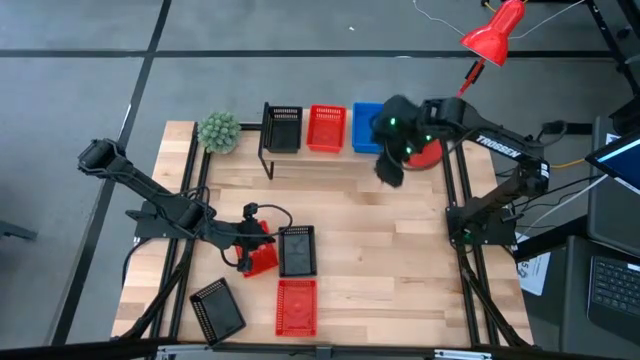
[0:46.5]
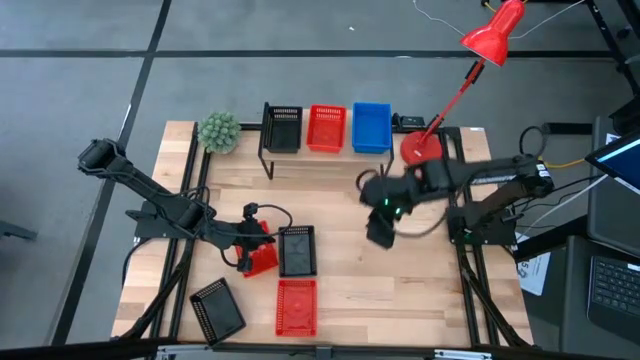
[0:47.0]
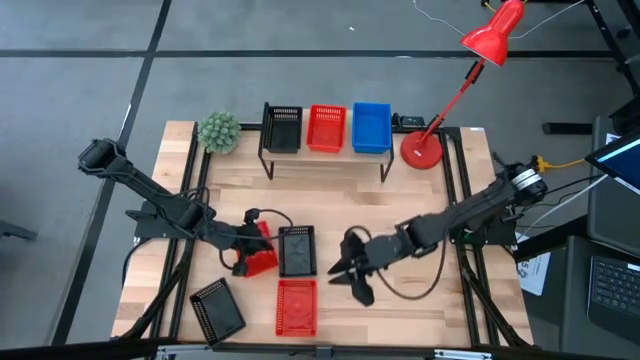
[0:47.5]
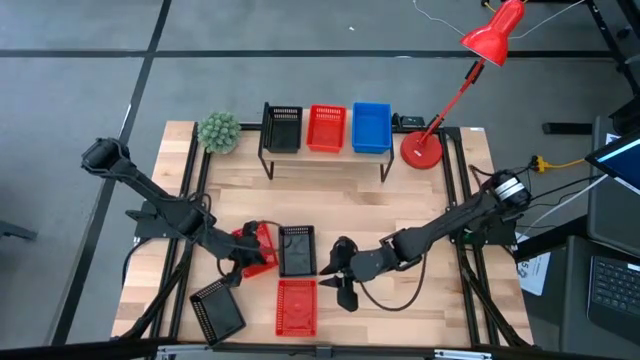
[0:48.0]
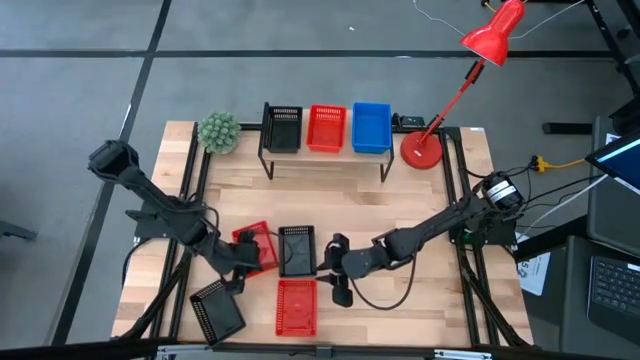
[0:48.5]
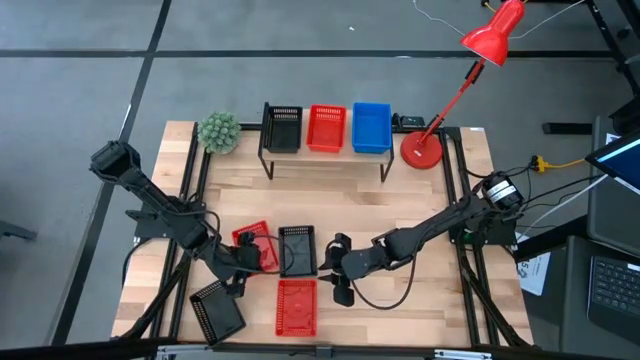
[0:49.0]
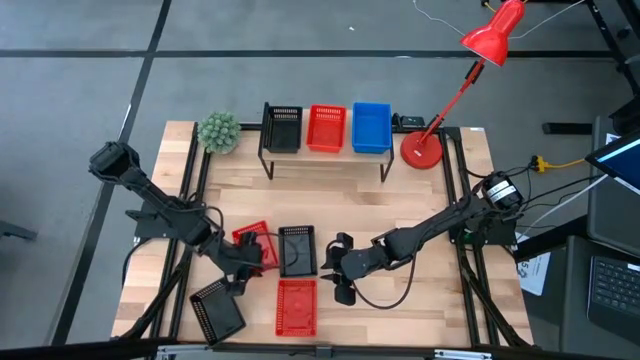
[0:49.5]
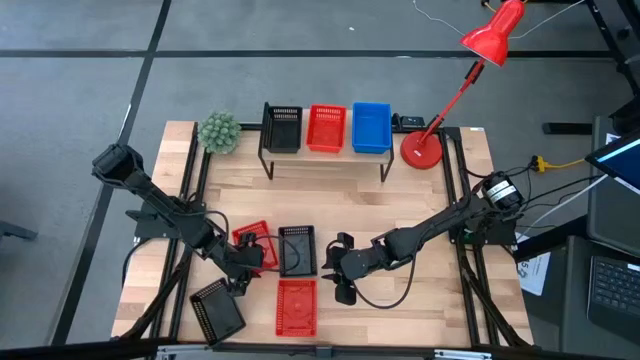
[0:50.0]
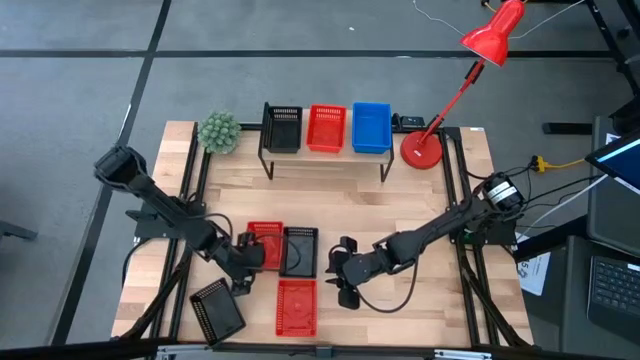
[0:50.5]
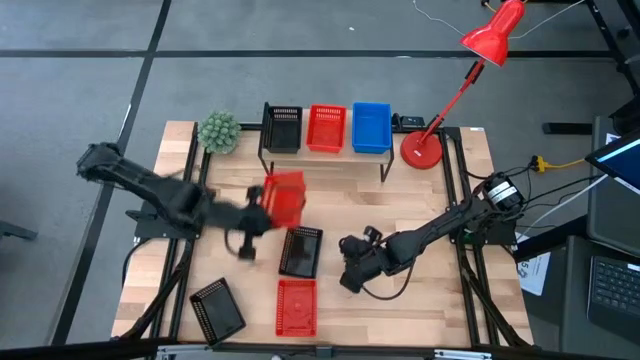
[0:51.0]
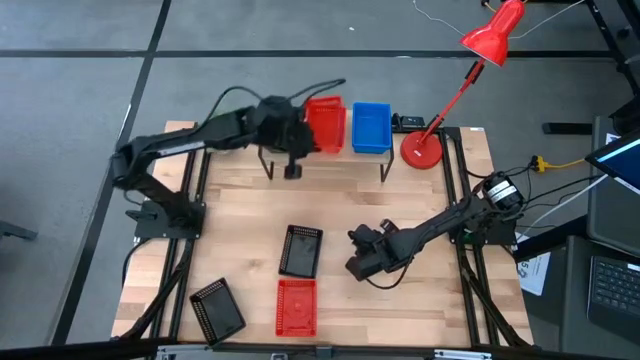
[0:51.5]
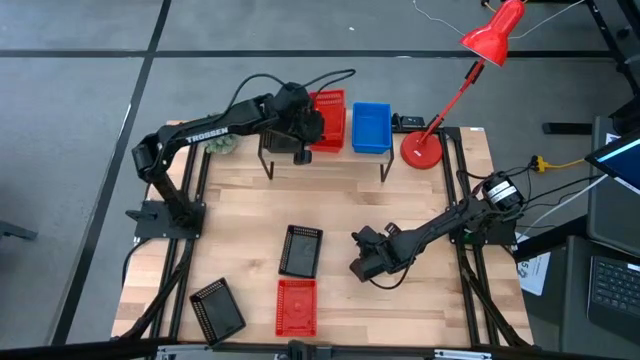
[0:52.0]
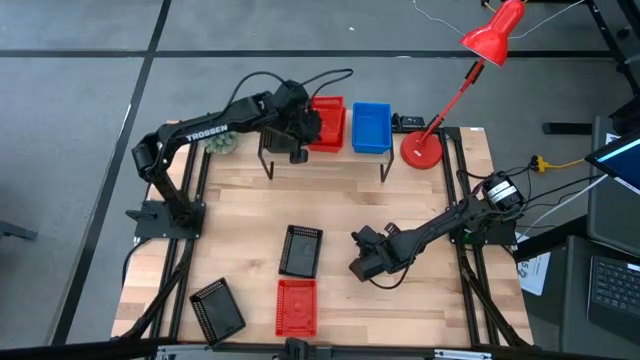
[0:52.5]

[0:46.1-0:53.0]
Task: Stack baskets on shelf by color
Stack the top red bin on the red bin on the shelf

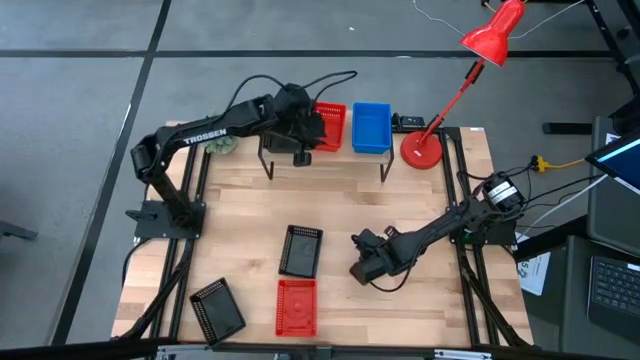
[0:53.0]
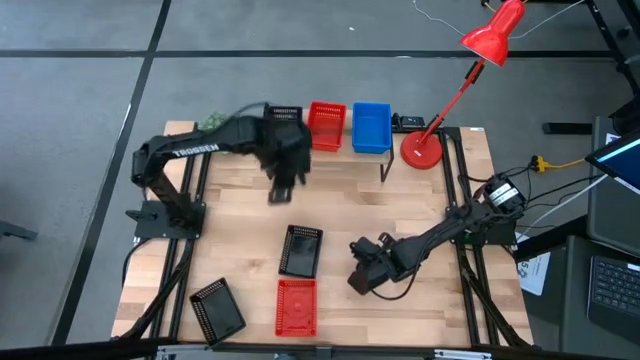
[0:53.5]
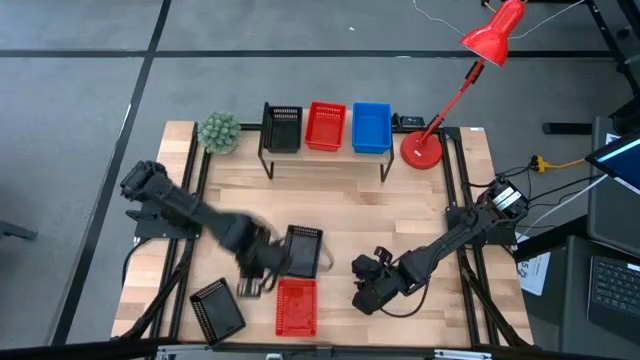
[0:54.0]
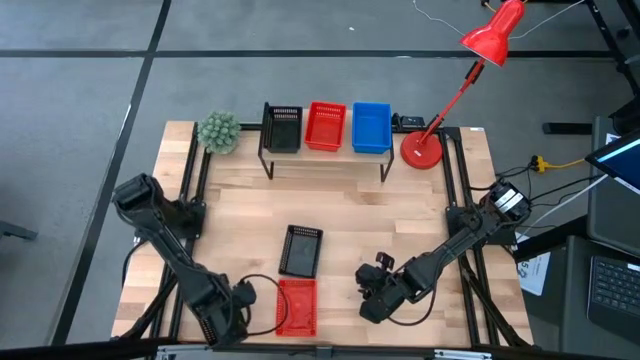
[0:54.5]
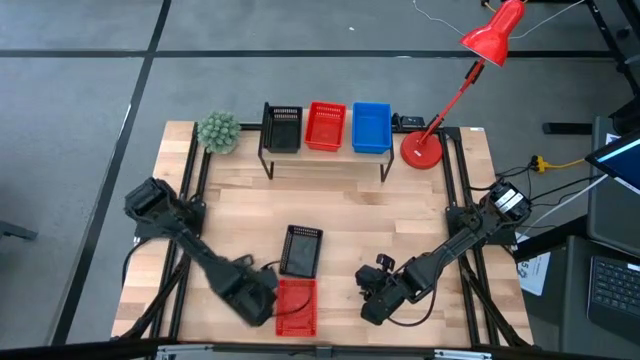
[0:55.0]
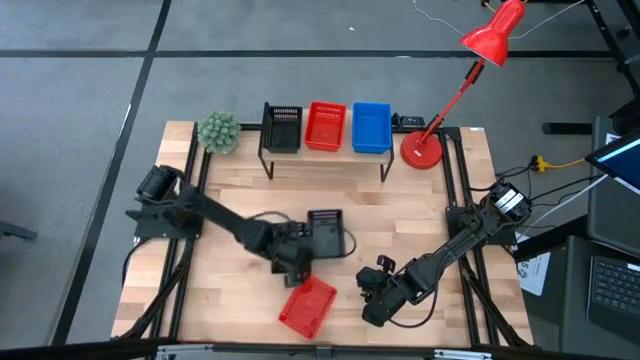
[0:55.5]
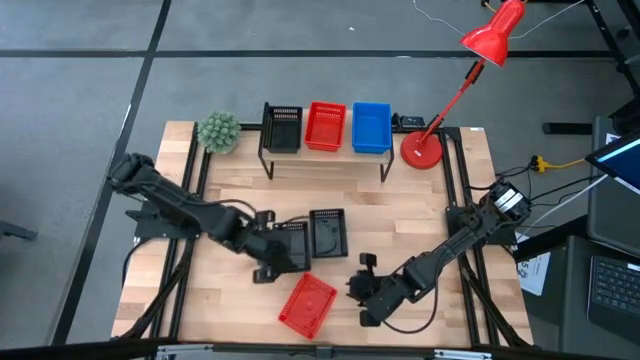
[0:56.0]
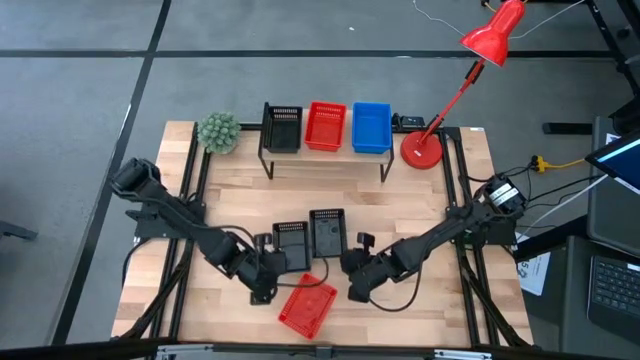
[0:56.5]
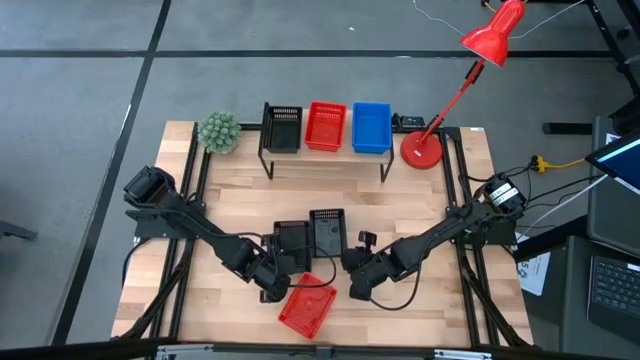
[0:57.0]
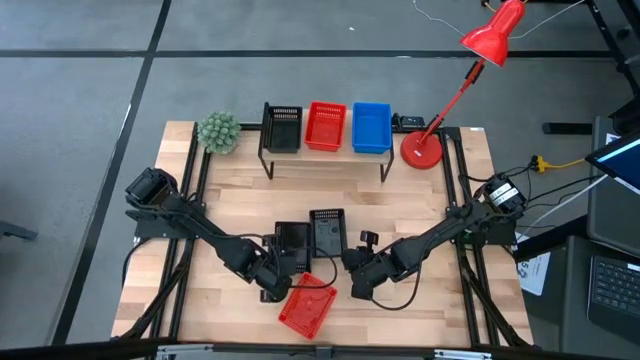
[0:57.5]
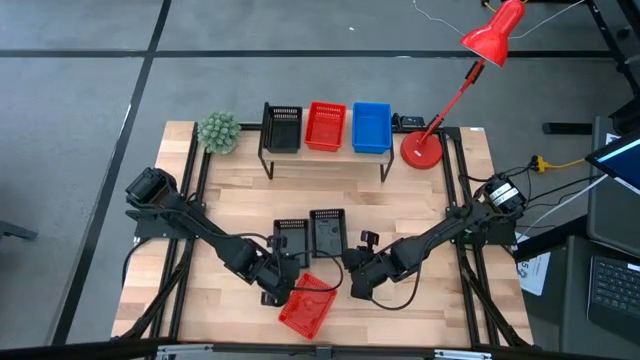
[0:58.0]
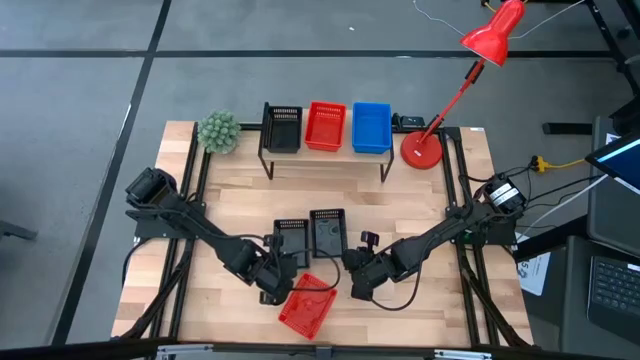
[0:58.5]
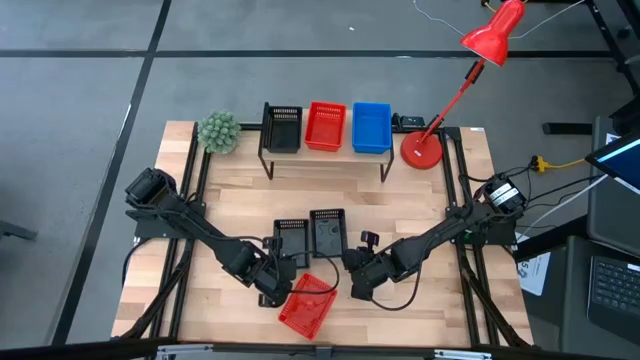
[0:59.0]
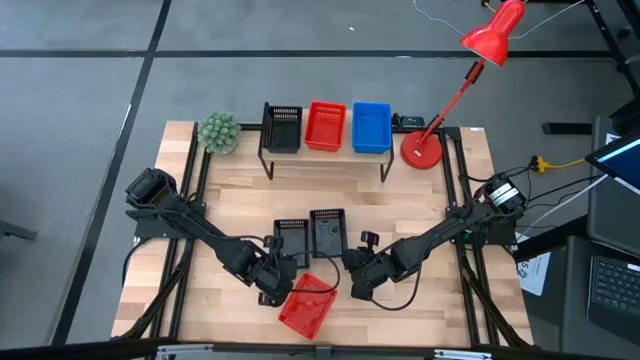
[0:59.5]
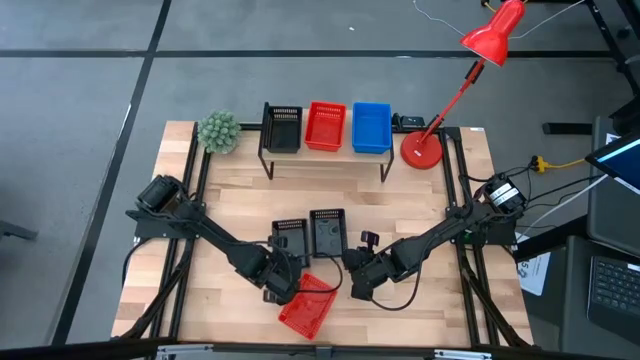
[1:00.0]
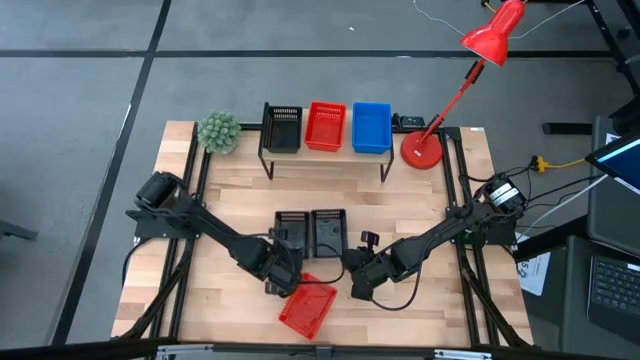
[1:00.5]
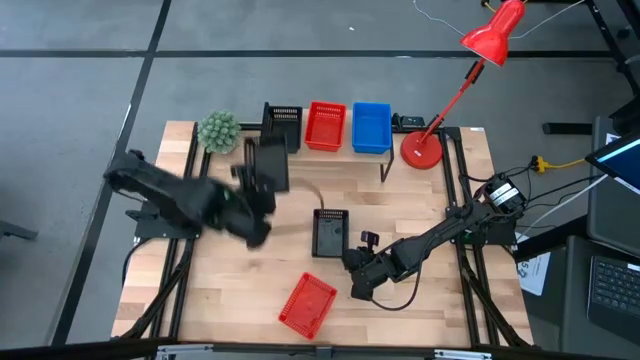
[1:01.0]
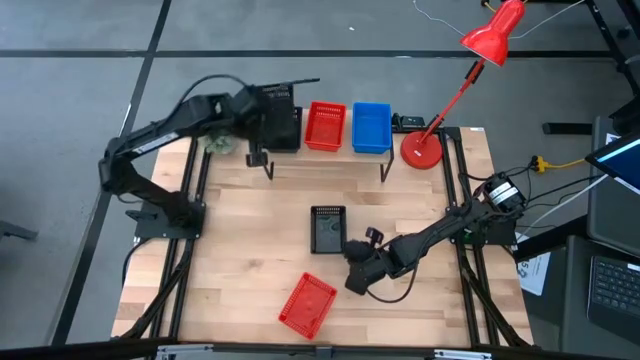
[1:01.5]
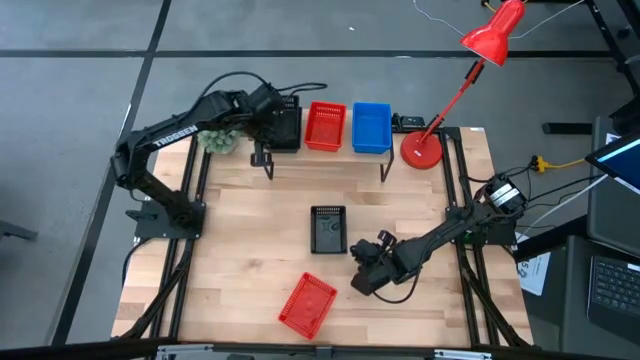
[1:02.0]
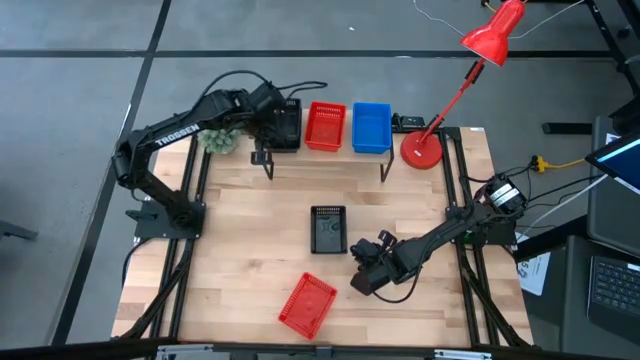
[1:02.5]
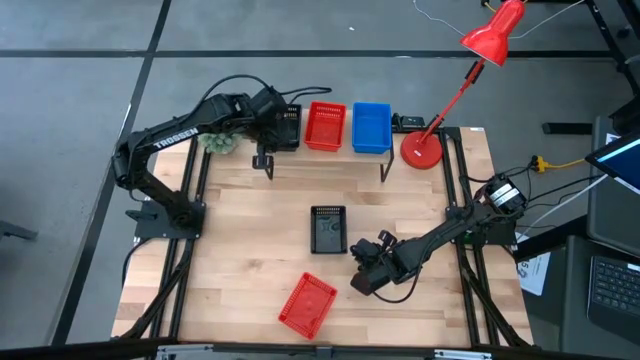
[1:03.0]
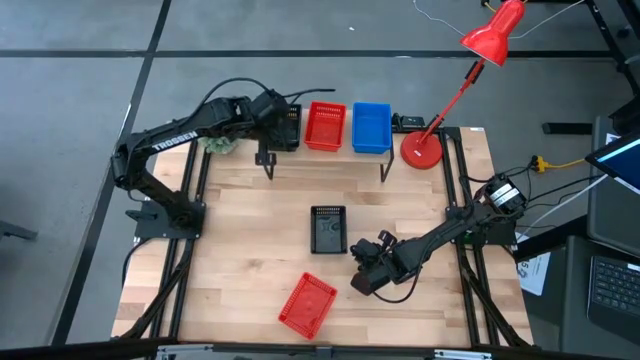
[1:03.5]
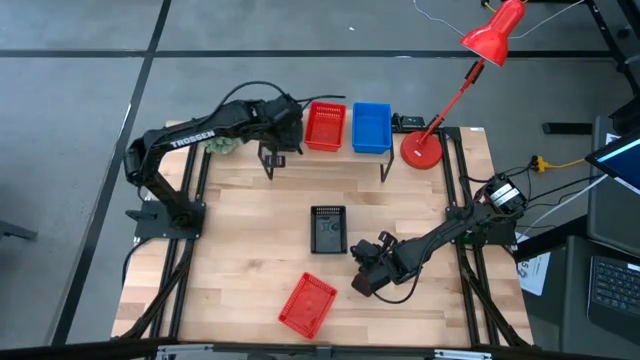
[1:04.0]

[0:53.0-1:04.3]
Stack the left black bin on the black bin on the shelf

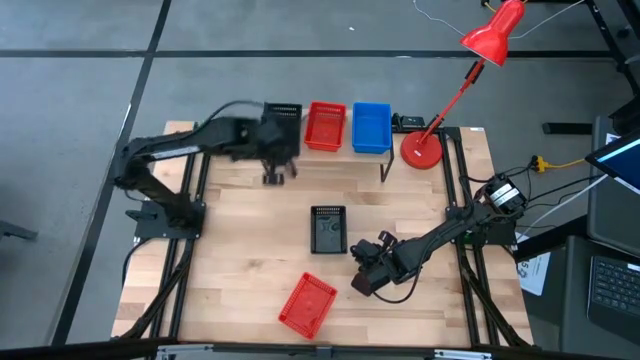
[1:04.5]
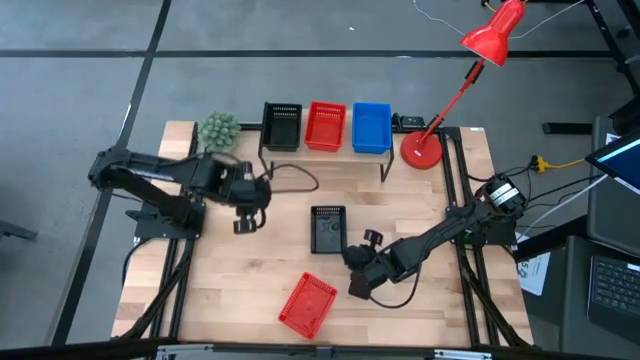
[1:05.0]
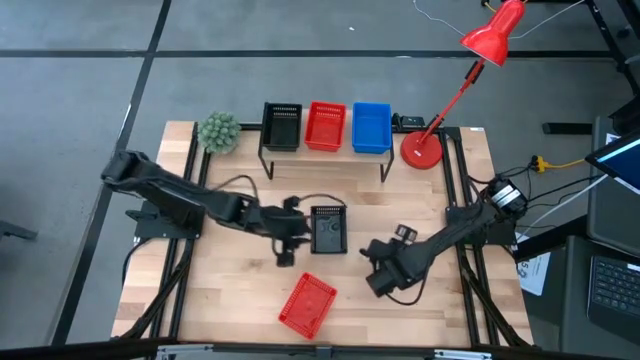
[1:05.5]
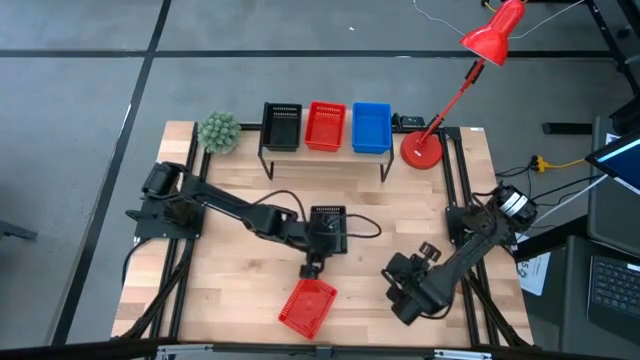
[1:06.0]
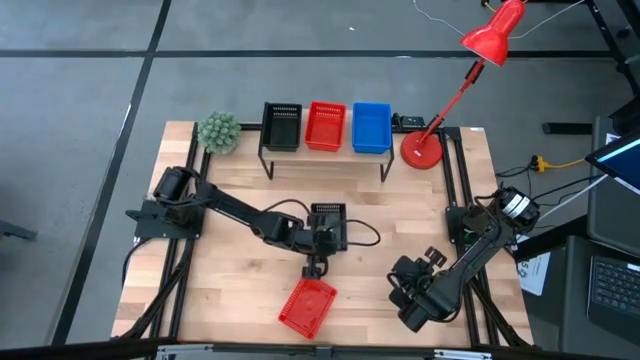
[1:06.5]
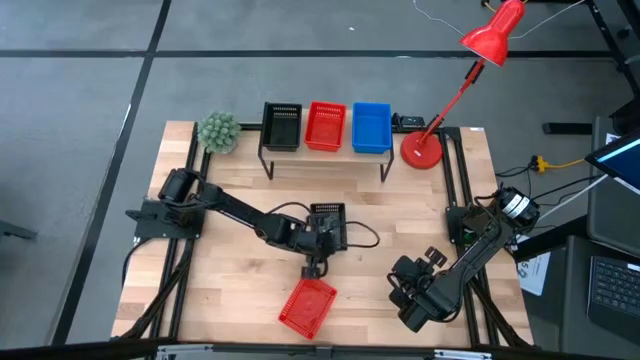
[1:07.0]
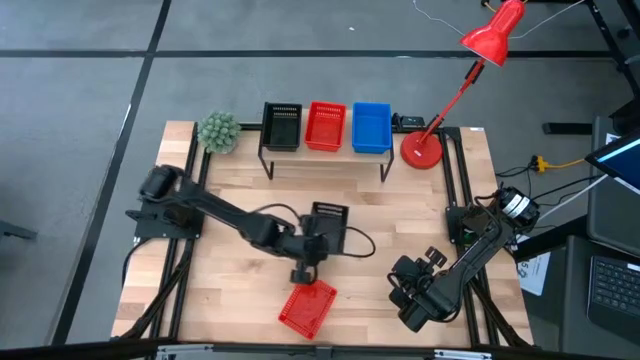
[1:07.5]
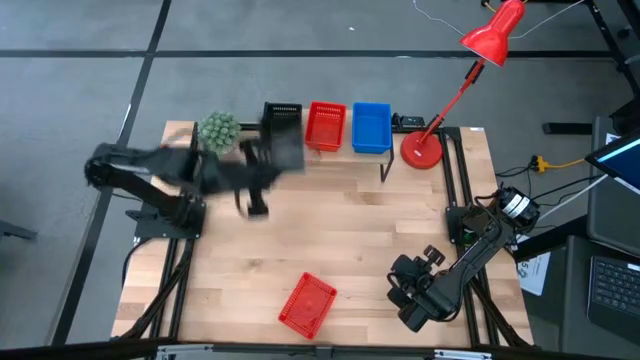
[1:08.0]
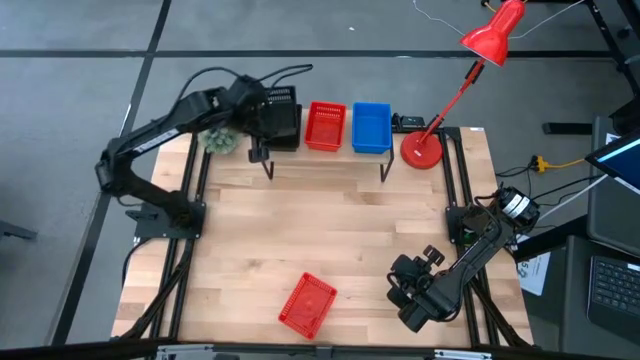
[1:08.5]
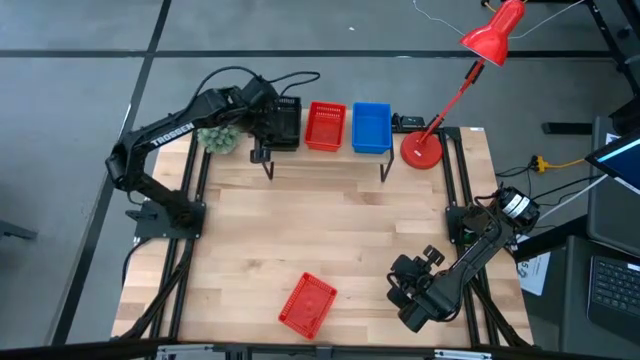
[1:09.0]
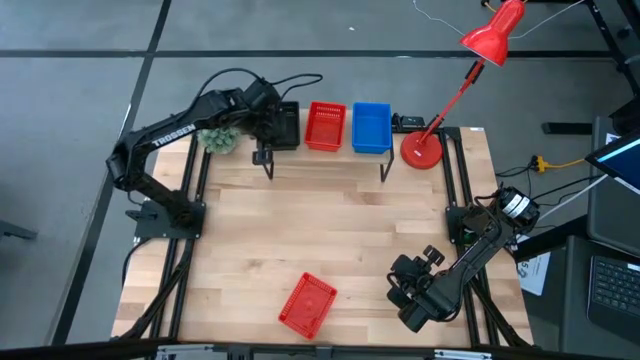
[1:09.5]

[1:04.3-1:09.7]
Stack the black bin on the stacked black bins on the shelf
